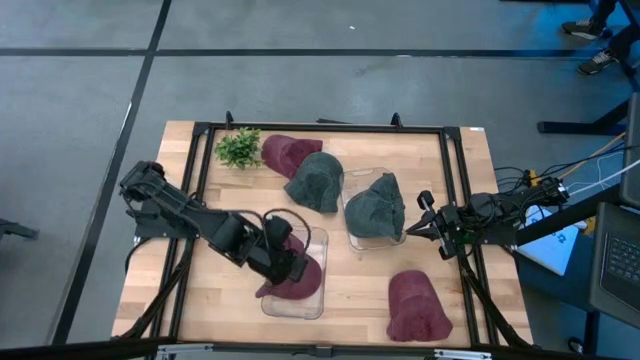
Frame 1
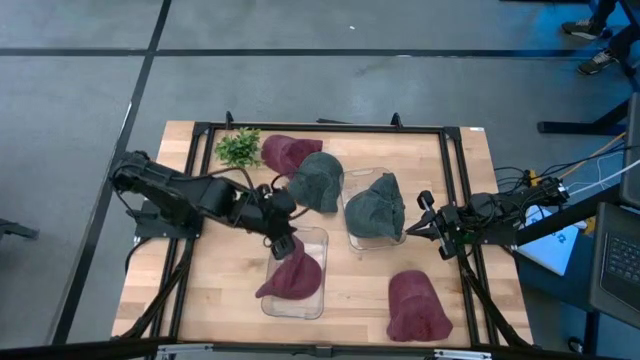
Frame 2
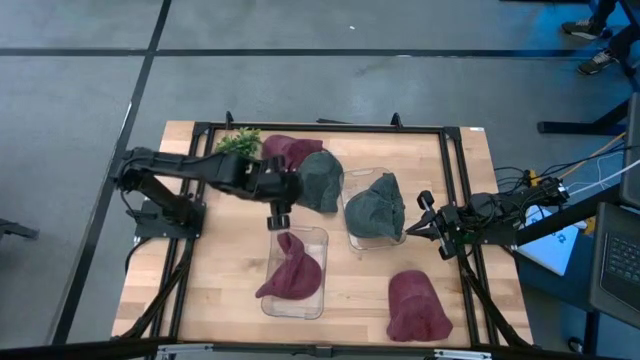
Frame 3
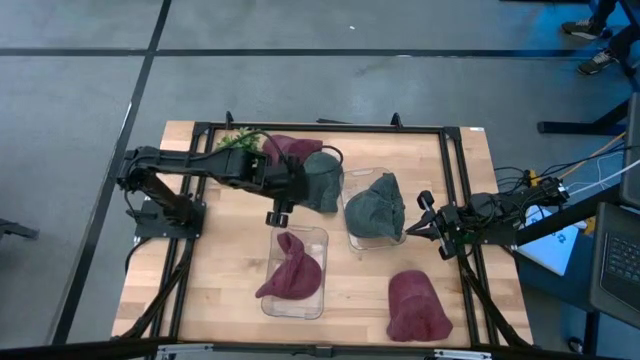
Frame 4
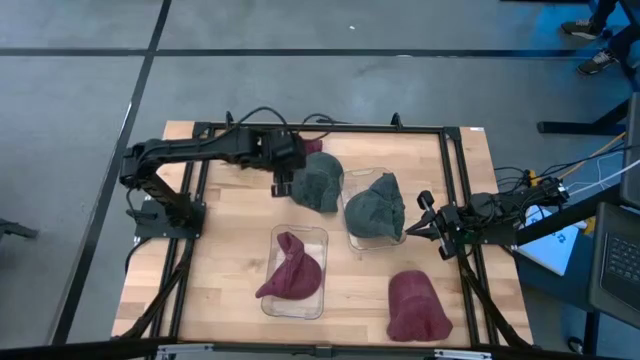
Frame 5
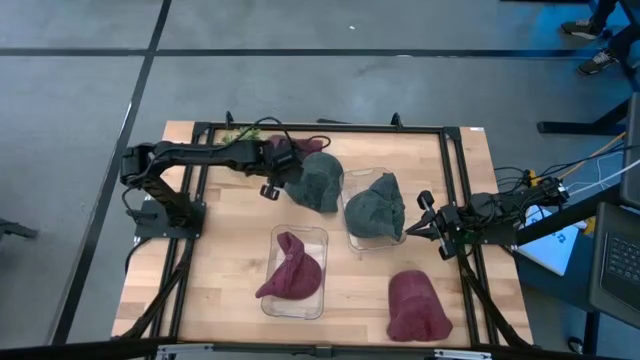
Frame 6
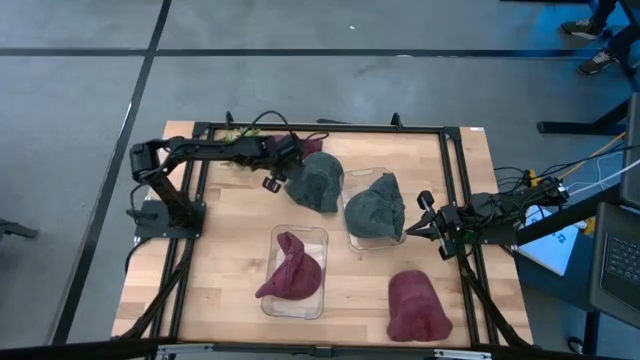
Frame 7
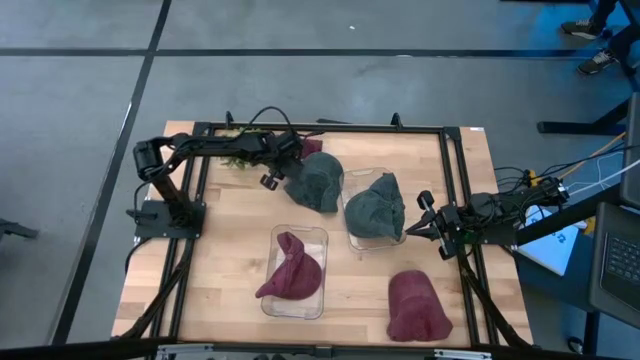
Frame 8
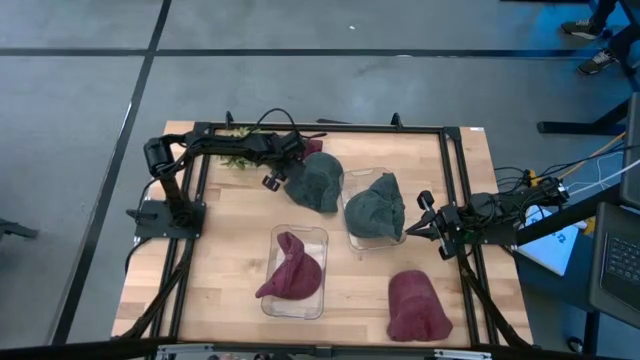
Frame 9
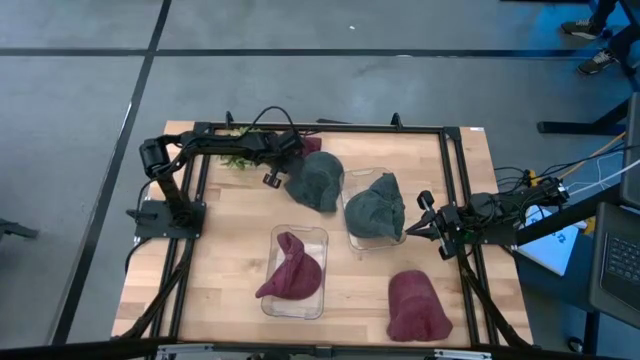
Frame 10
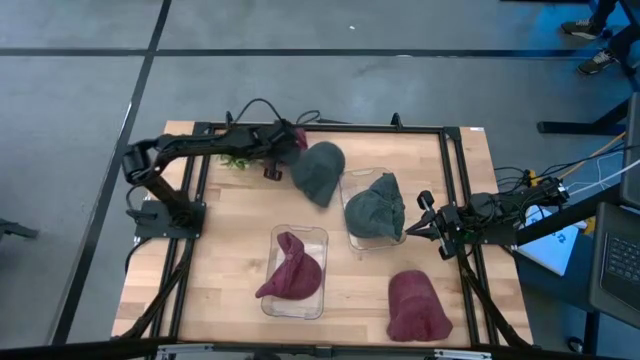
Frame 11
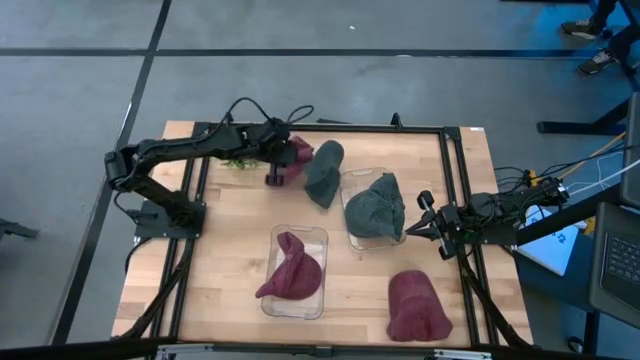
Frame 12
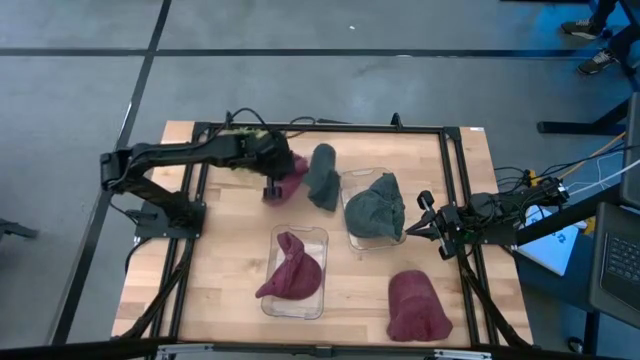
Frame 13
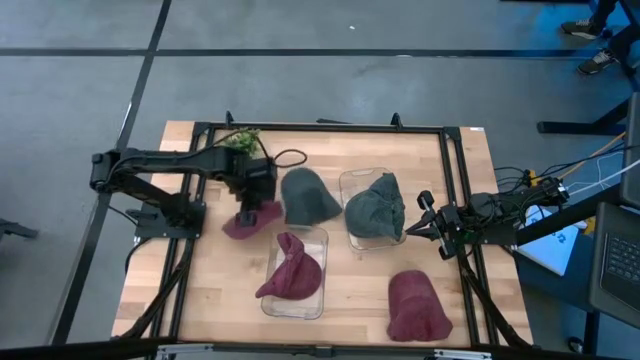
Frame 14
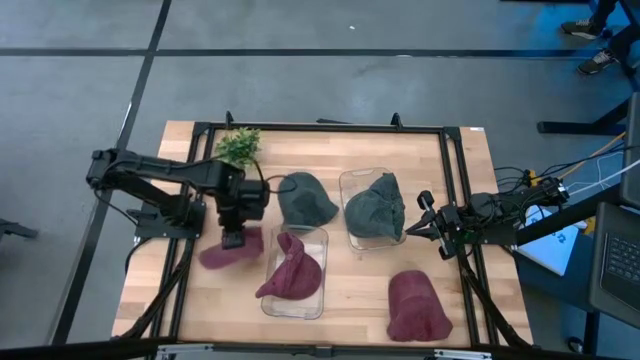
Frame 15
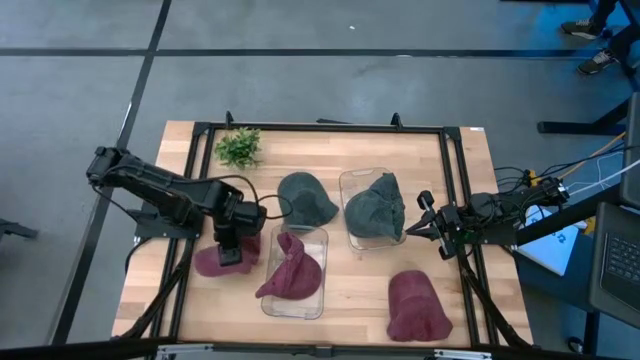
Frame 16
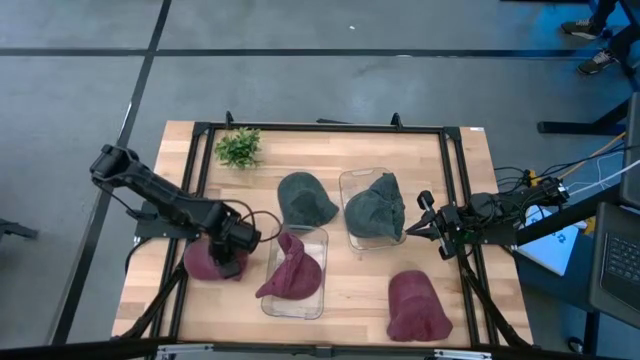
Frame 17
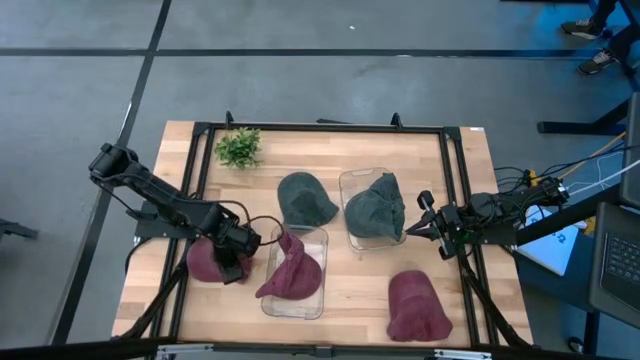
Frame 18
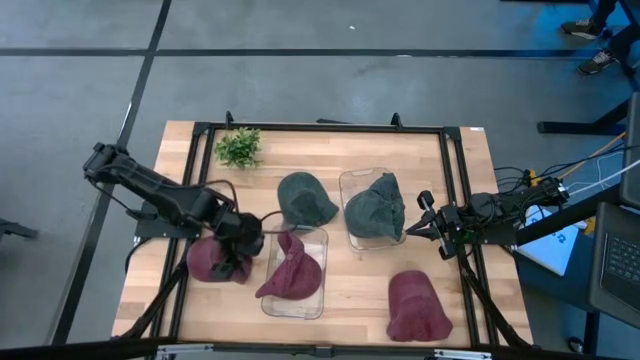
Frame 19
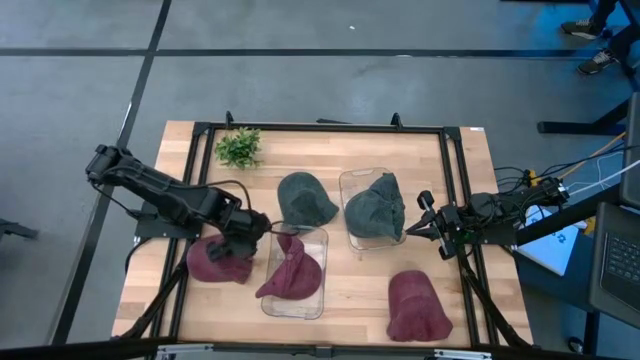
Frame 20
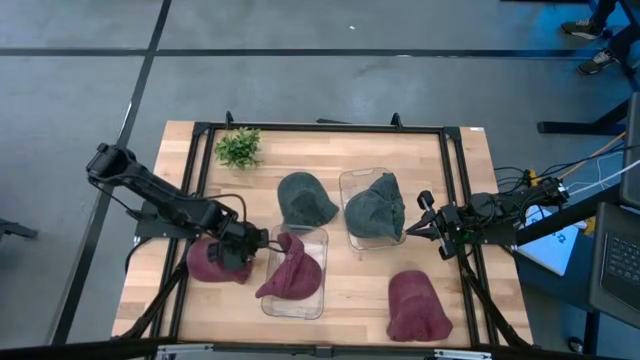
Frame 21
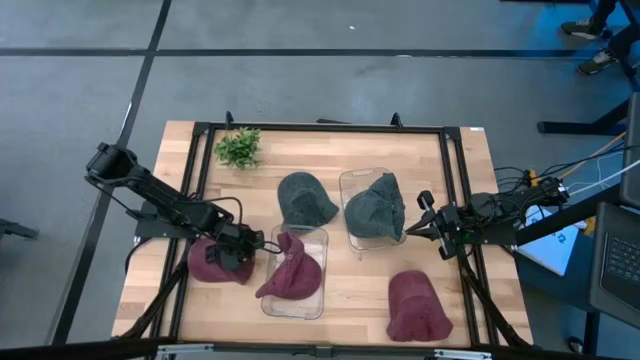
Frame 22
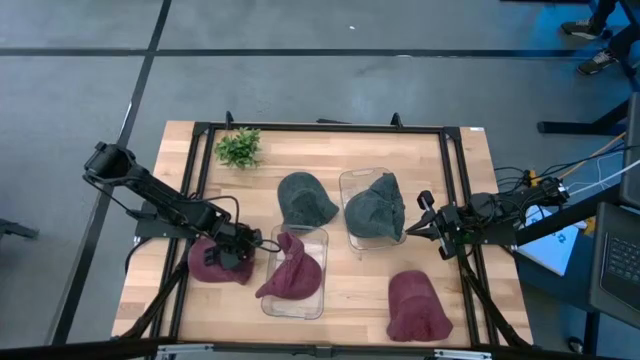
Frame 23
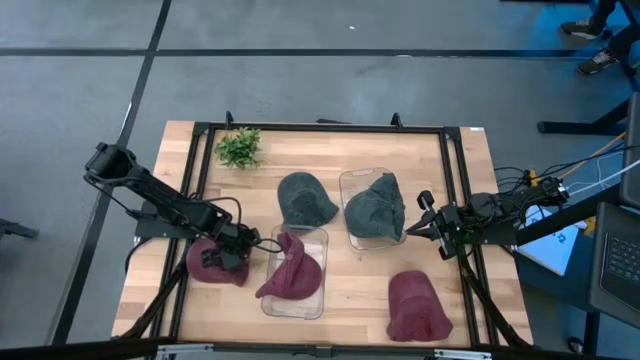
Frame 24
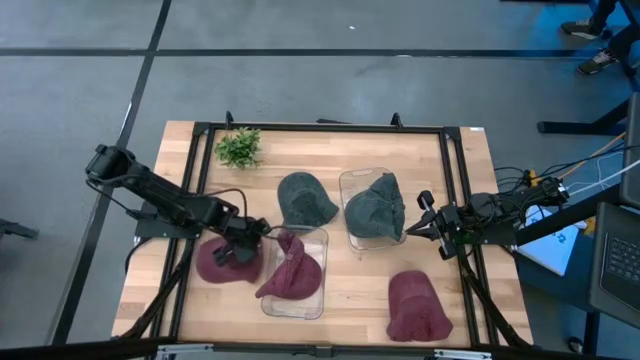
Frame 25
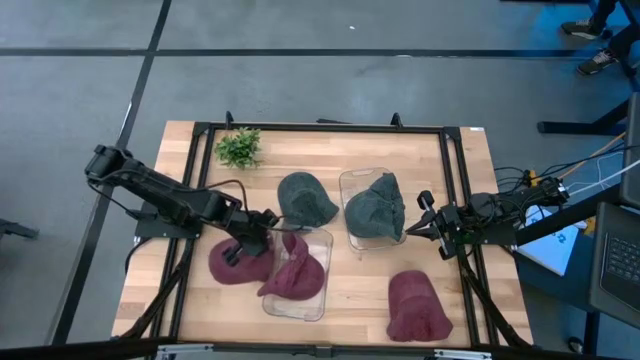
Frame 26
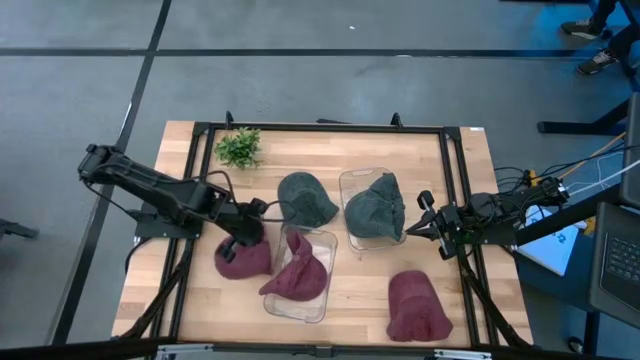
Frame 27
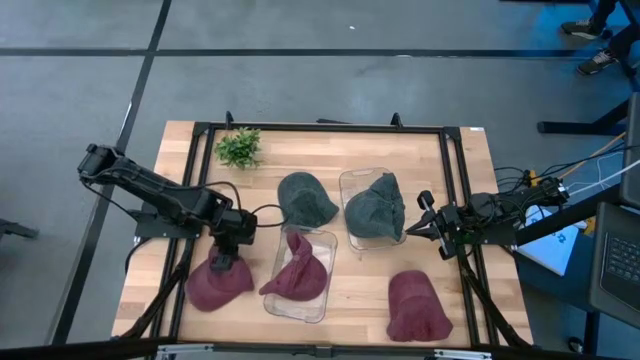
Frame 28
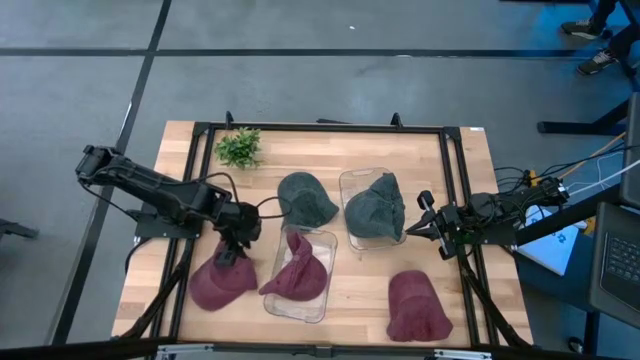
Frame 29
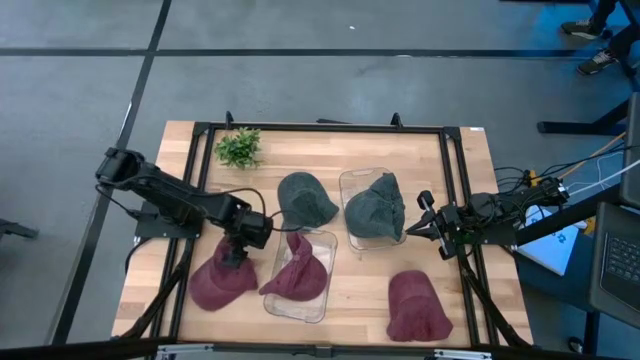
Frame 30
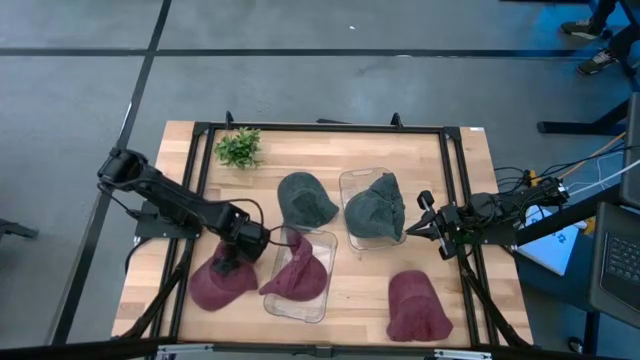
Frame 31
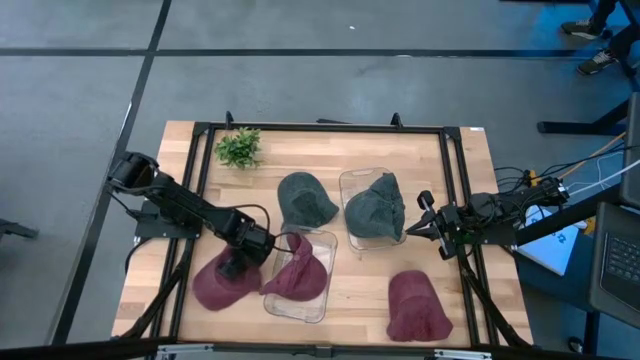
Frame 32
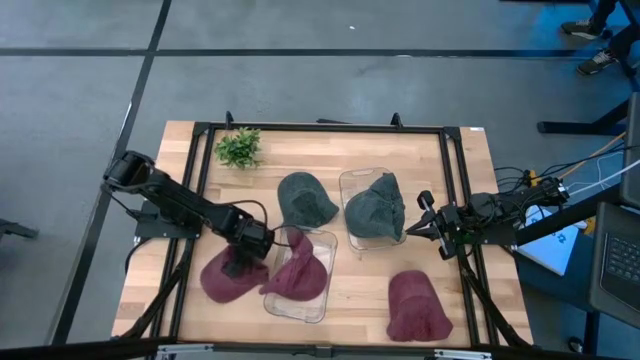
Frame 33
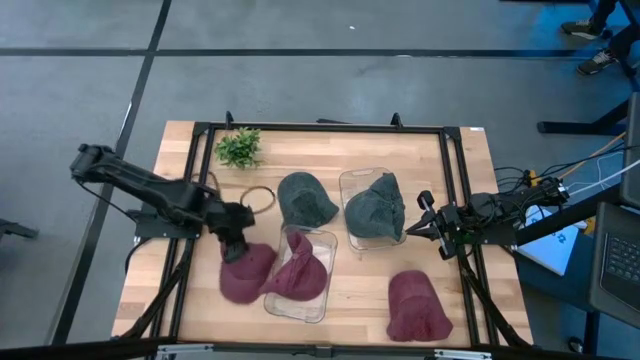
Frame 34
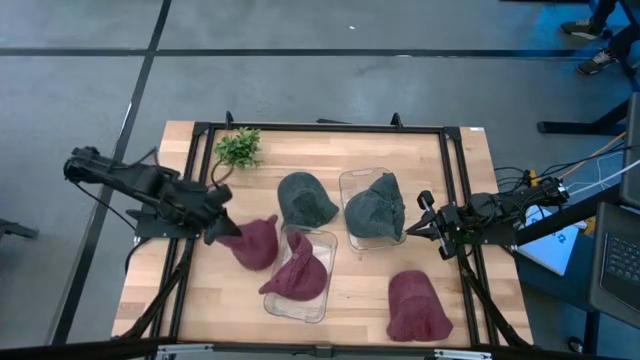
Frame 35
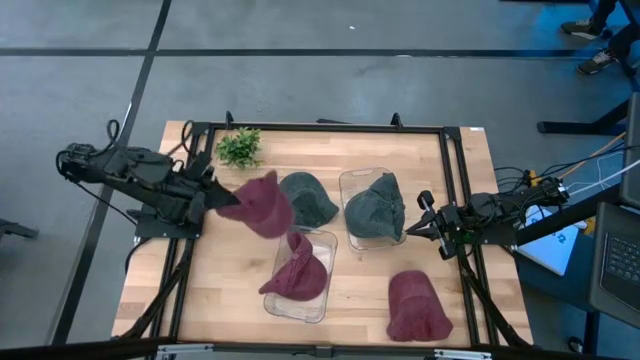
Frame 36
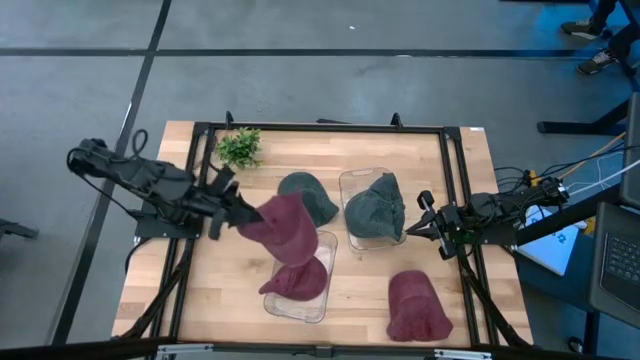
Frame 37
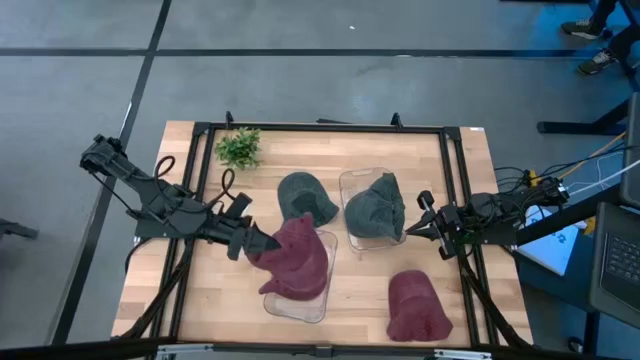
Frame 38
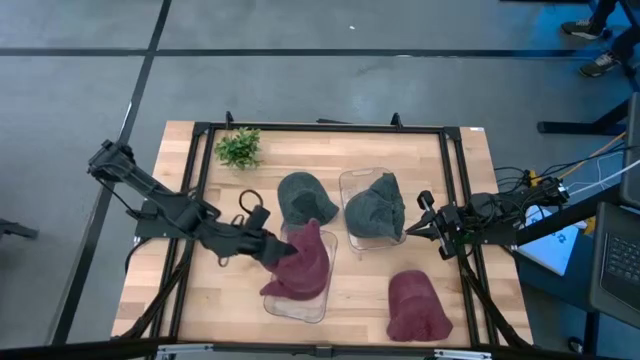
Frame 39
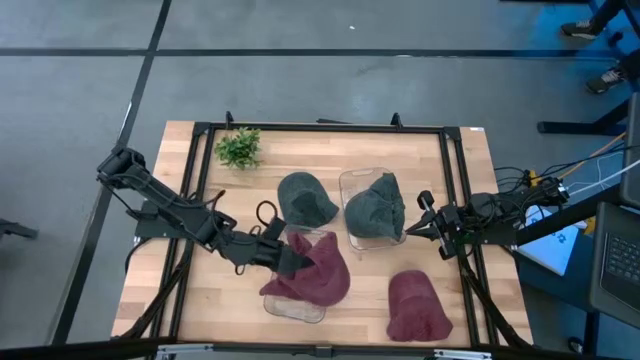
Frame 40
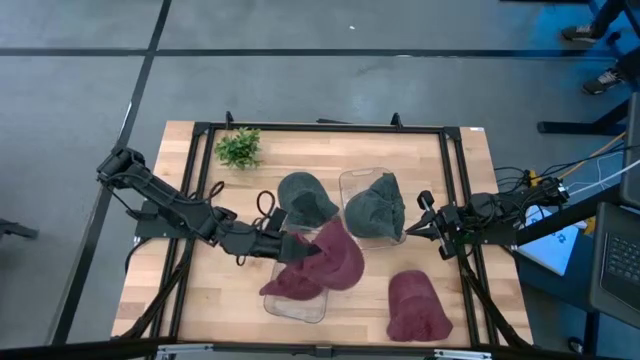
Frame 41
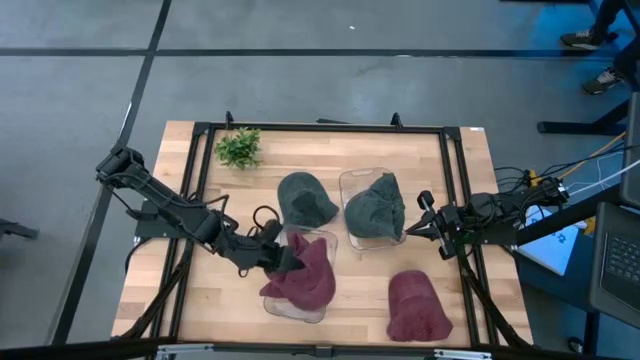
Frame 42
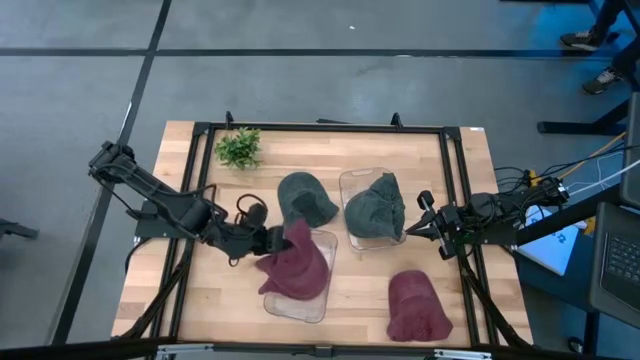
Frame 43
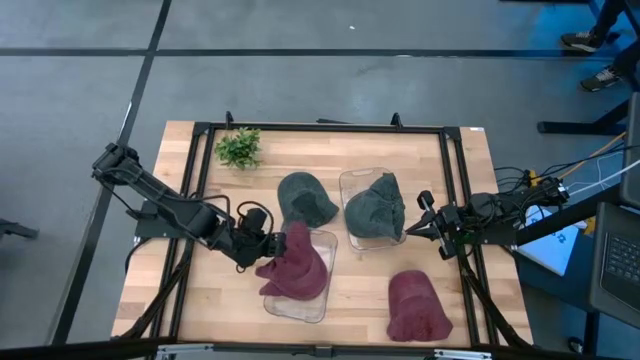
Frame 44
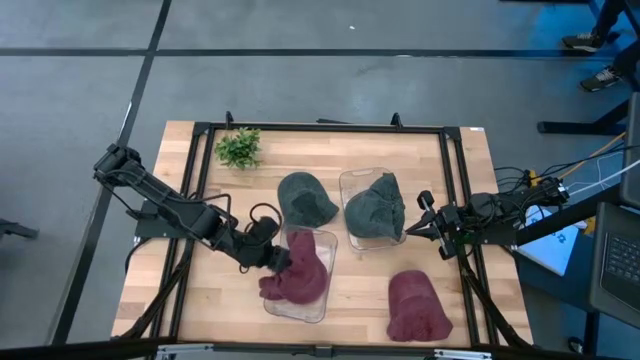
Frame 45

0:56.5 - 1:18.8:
Task: Pick & Place hat
Put the top red cap into the left transparent bin
